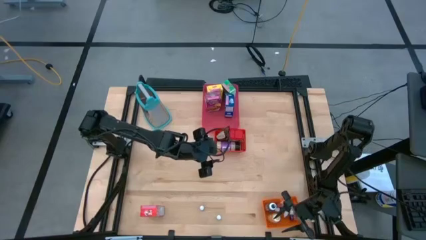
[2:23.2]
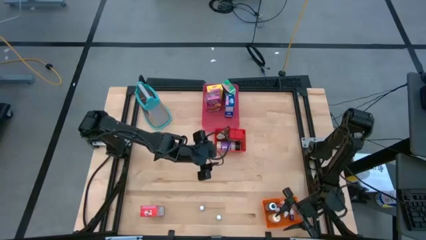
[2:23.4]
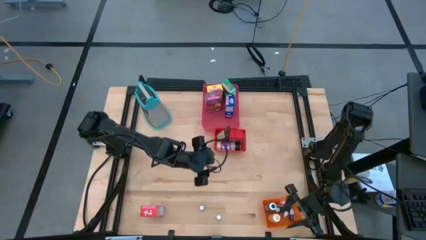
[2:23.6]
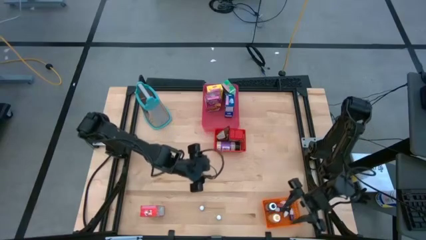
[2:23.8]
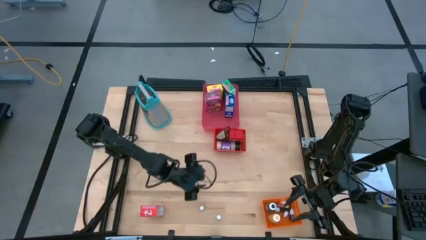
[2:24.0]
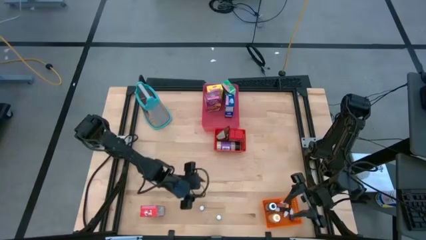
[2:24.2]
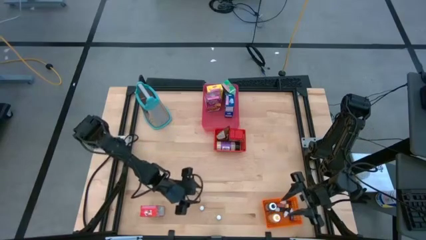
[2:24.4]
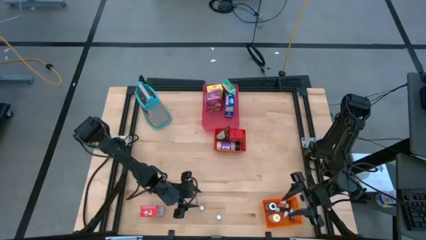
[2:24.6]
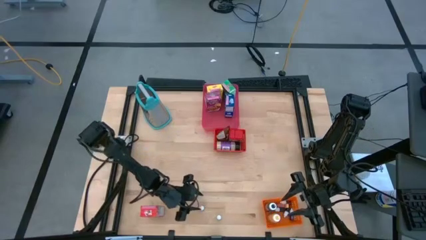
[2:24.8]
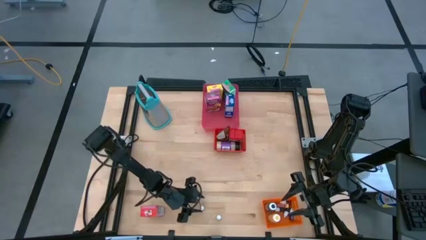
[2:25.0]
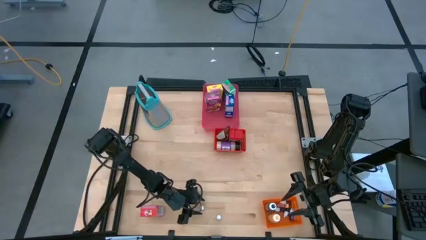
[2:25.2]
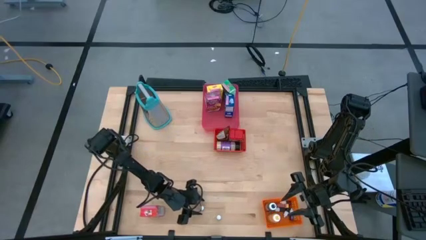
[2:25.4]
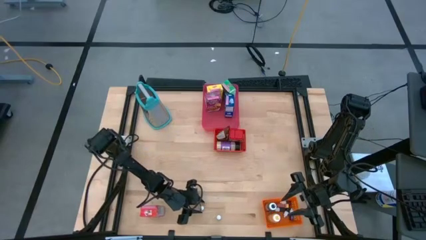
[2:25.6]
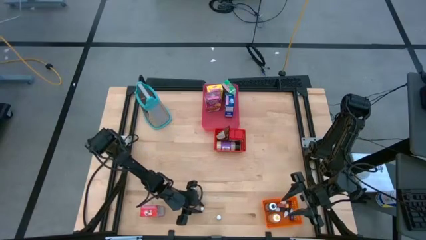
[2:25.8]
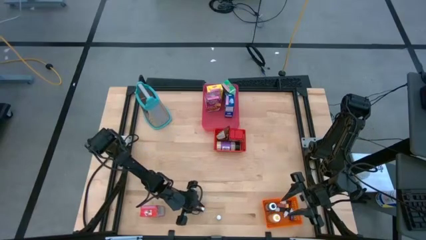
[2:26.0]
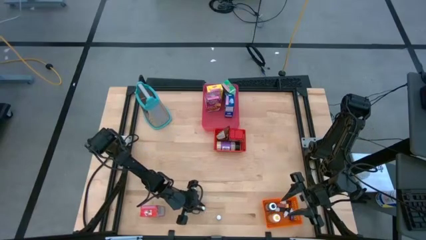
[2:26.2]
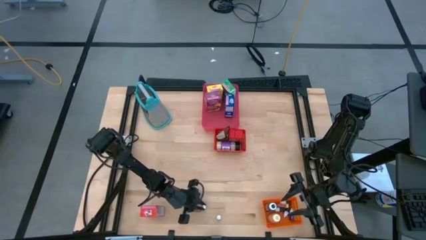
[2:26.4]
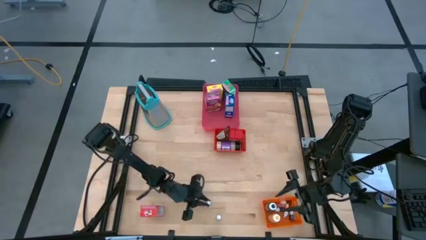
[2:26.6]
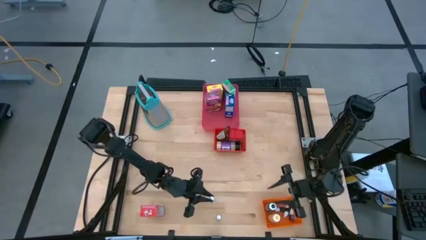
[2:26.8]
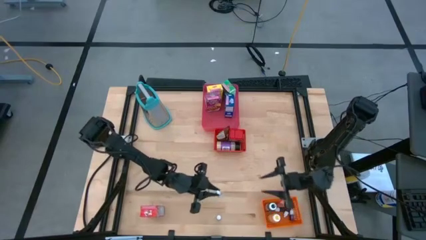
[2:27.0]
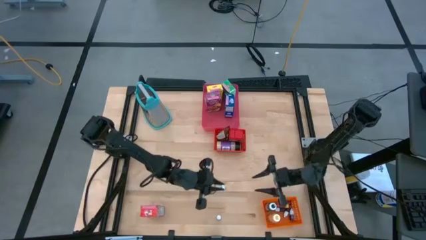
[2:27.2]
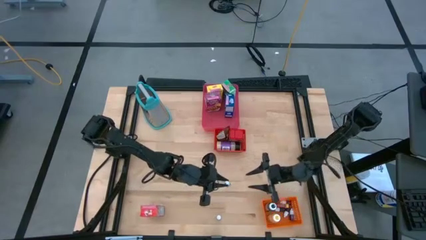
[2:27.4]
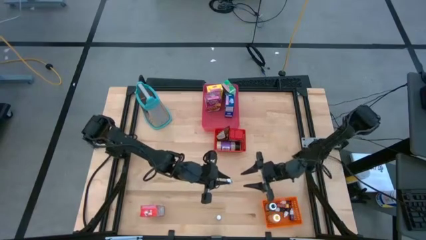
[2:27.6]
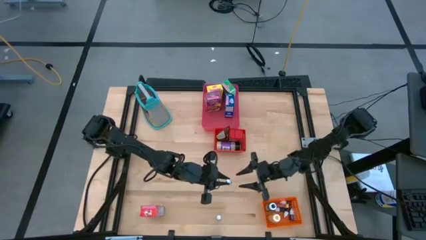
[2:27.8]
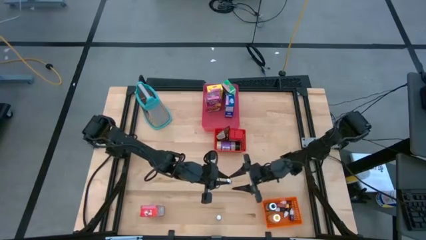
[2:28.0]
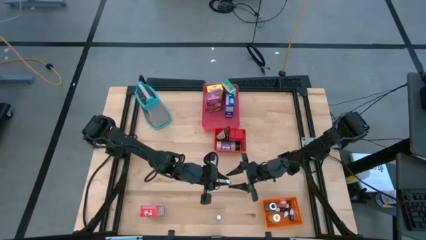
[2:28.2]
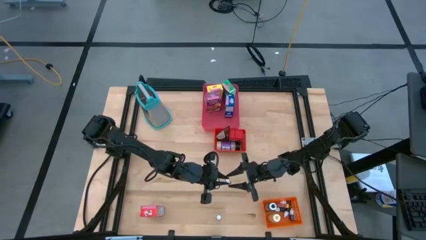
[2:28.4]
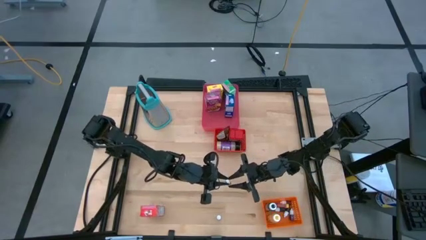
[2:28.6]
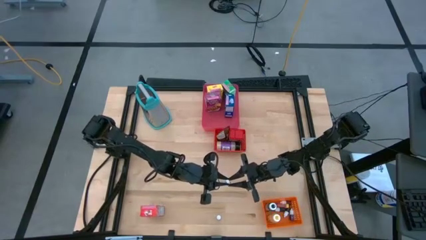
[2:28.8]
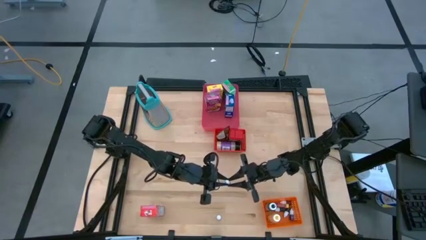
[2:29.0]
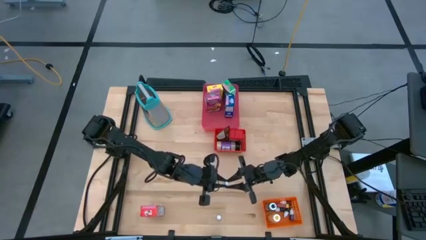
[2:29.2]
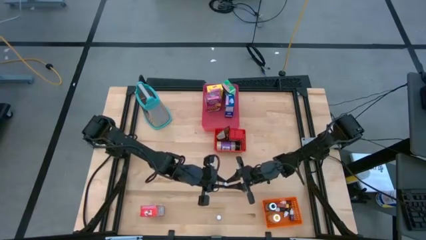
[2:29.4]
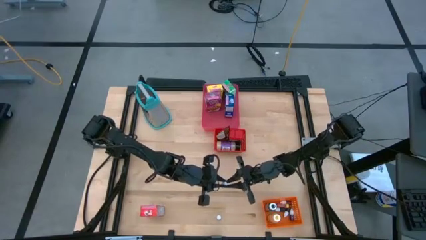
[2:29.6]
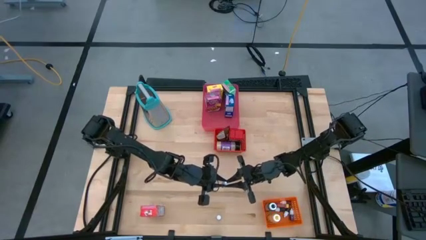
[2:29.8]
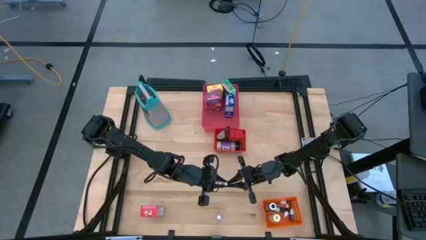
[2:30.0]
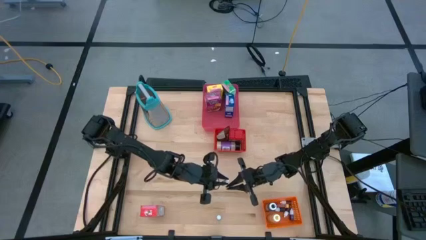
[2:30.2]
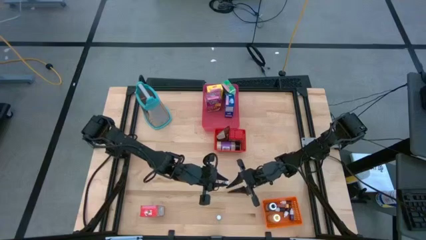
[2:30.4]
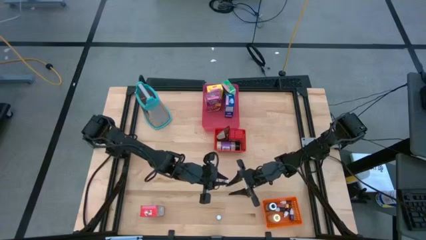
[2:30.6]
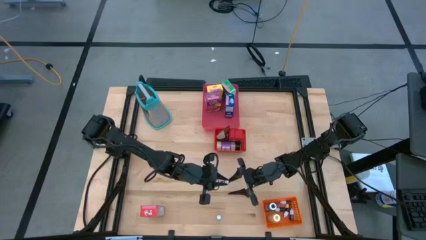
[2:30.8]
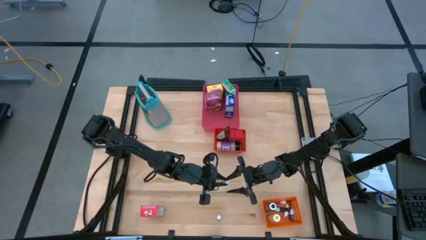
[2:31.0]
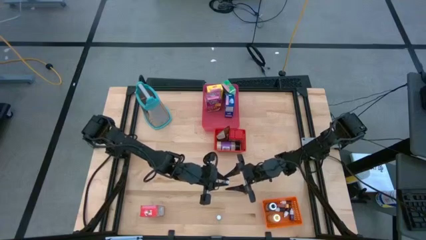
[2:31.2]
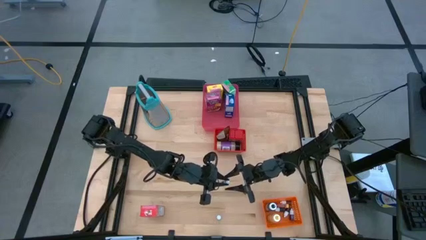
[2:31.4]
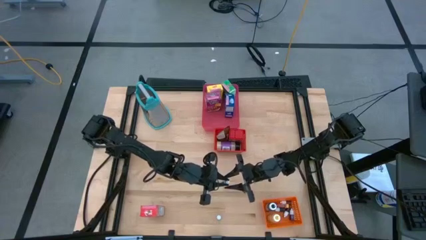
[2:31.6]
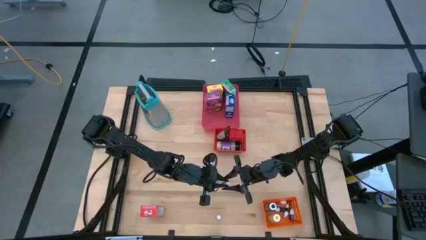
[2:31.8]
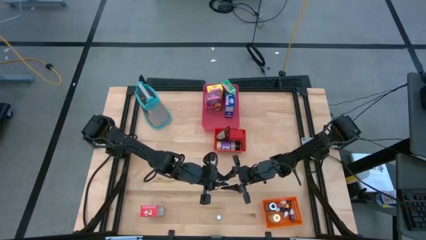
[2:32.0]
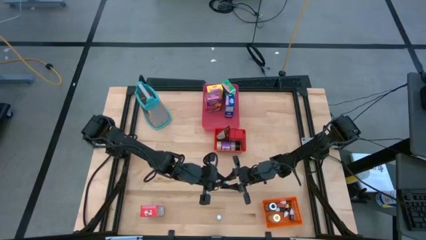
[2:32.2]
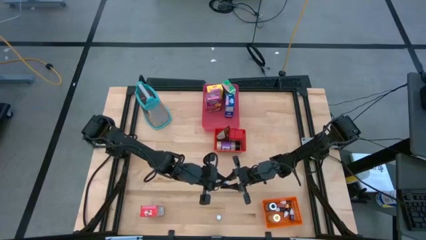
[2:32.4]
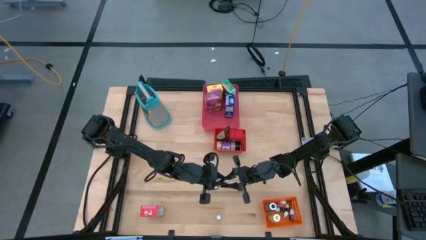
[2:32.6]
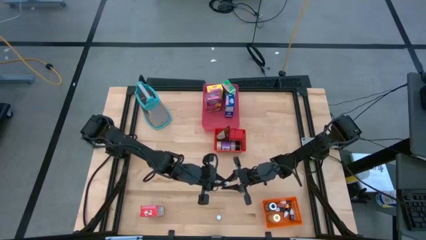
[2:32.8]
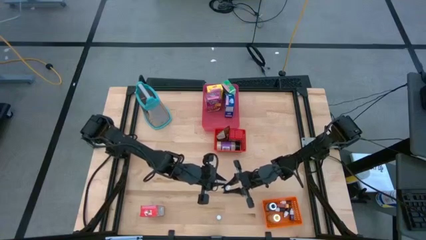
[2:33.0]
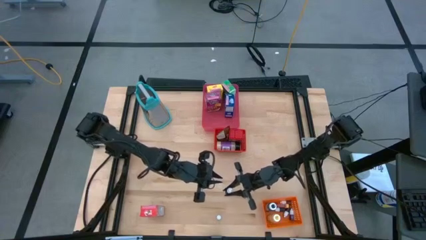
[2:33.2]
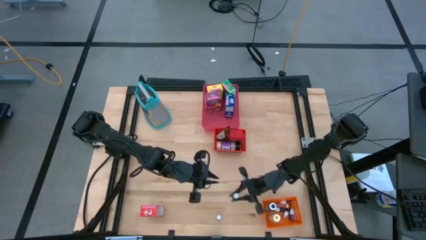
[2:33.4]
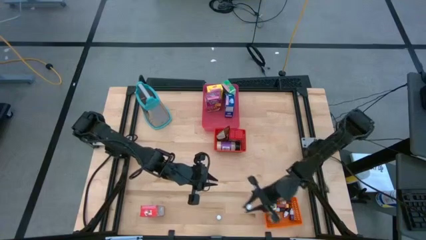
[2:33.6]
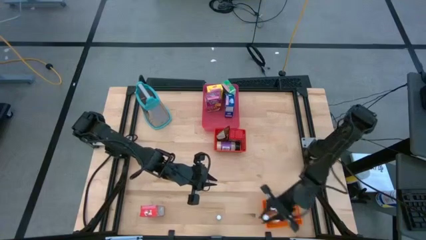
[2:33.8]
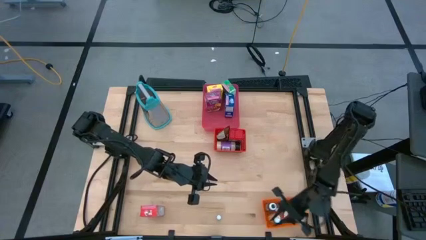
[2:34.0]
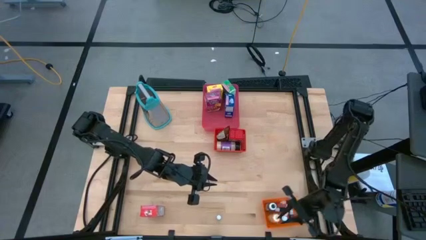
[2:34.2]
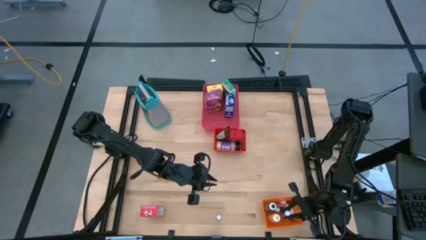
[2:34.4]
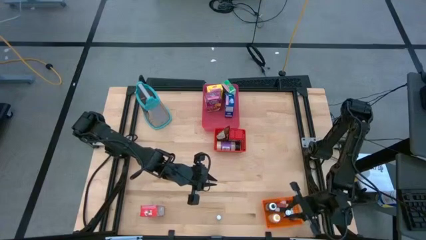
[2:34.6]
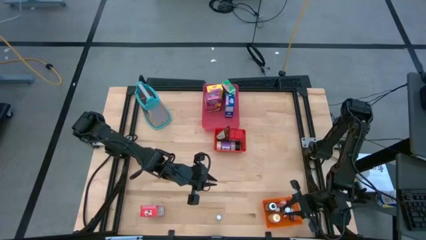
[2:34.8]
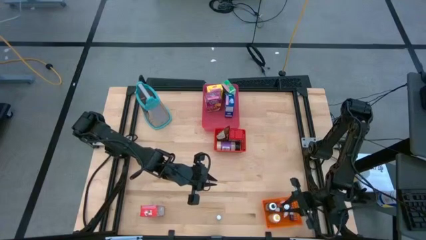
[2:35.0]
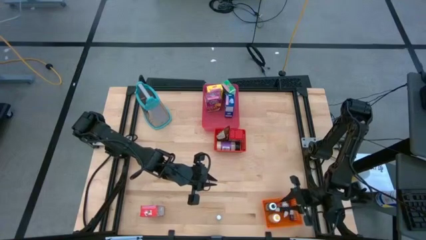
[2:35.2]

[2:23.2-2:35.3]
Task: Pick & Place Kitchen Items
Put the brown food coloring bottle into the orange bin
